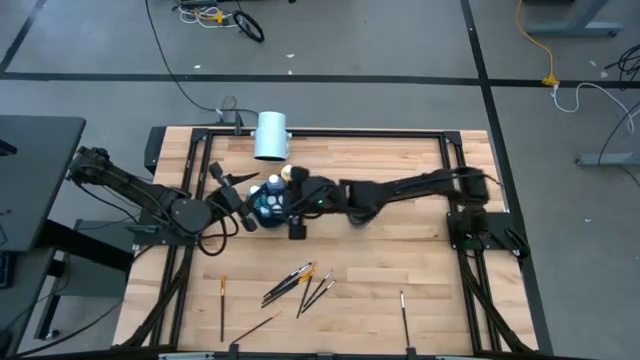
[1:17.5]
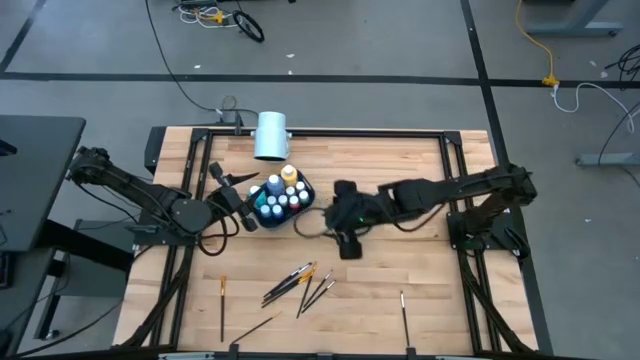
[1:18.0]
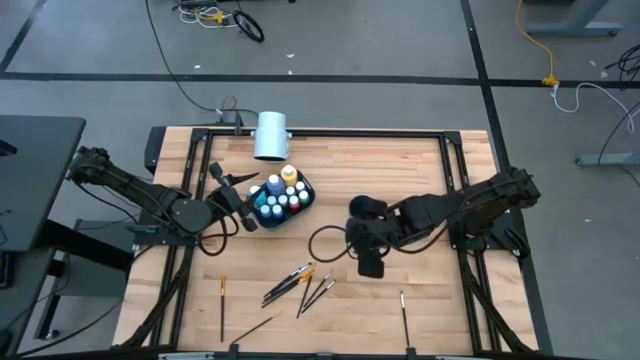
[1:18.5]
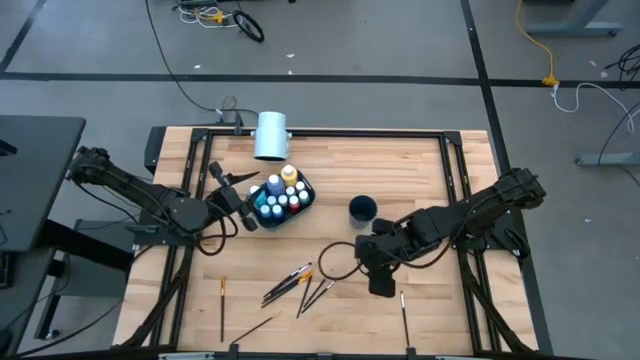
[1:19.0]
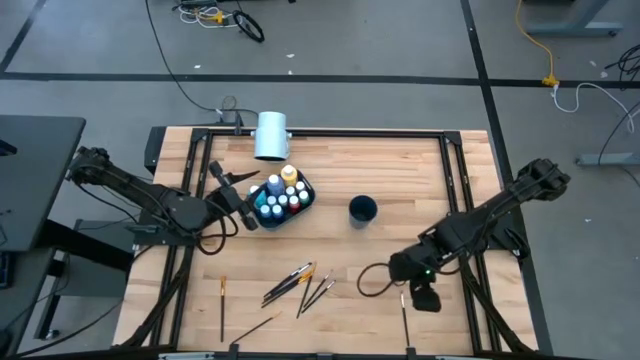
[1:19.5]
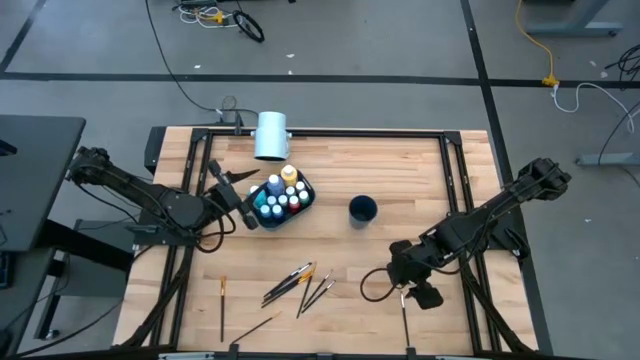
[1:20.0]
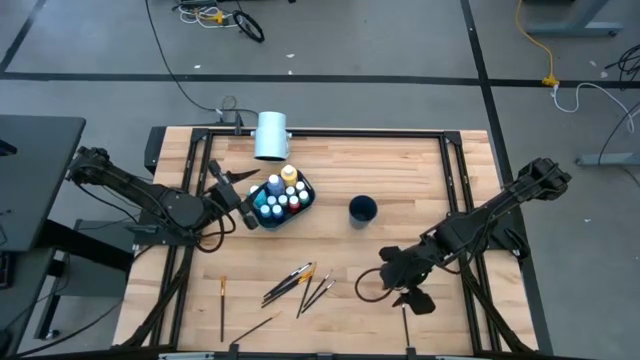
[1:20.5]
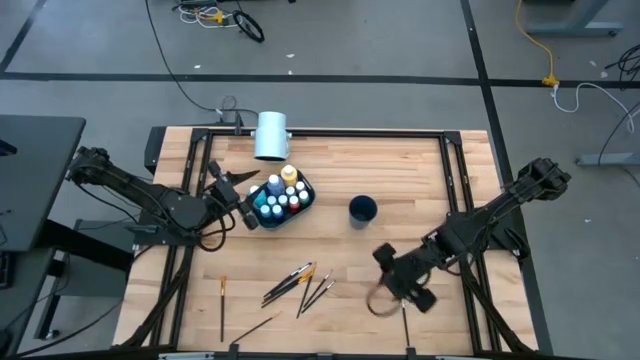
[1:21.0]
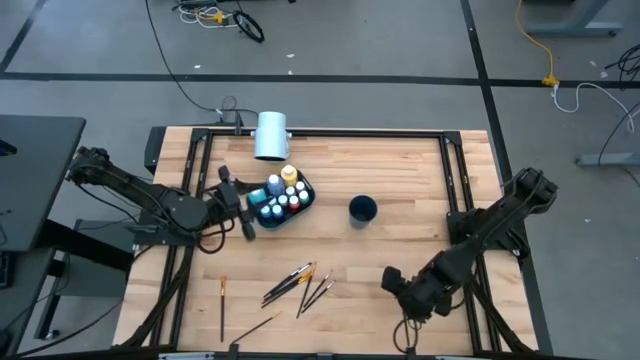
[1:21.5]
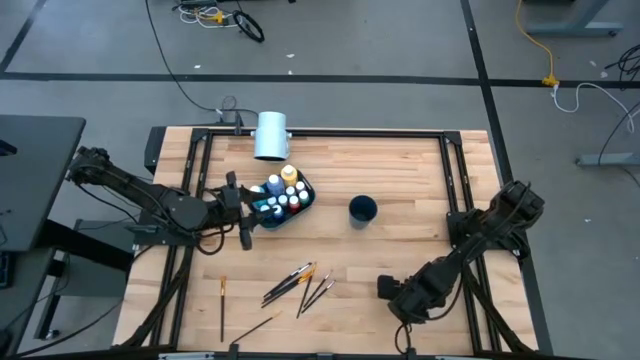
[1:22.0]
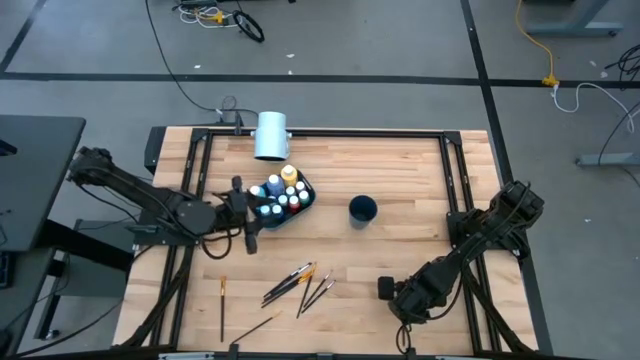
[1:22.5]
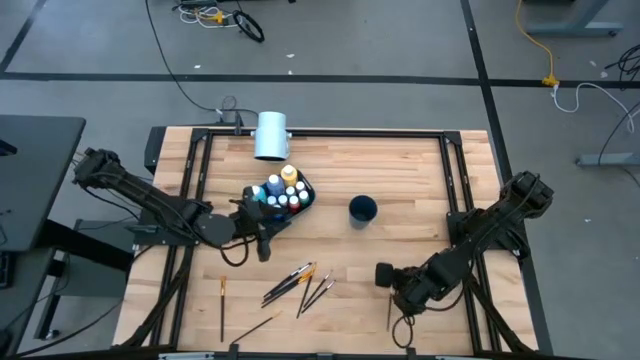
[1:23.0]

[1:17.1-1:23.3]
Task: Pick & Place Paint Supplies
Put the silver paint brush into the blue cup

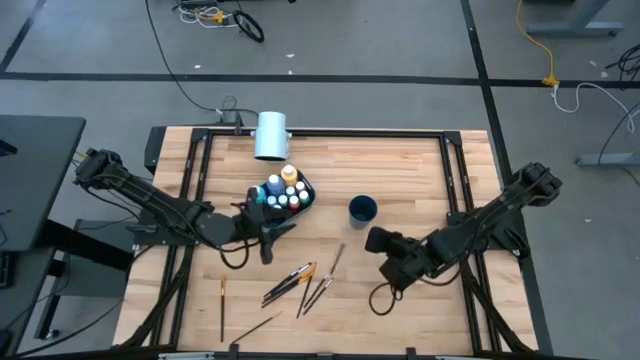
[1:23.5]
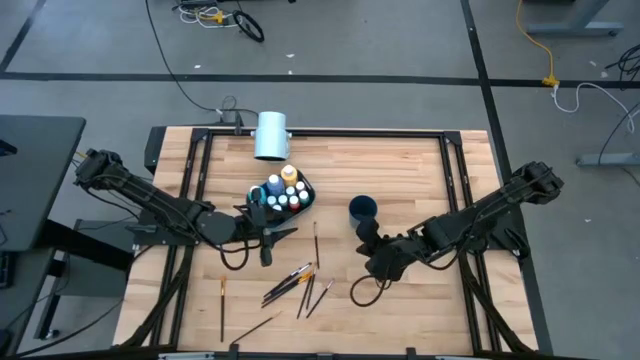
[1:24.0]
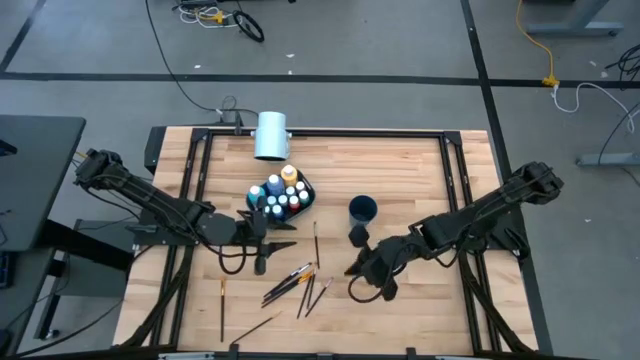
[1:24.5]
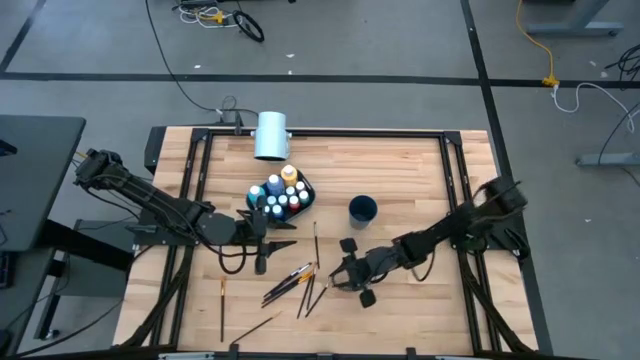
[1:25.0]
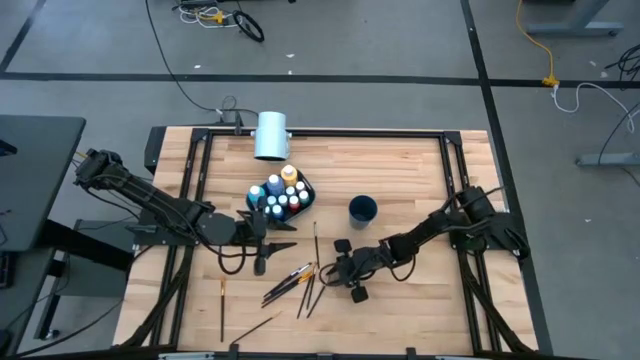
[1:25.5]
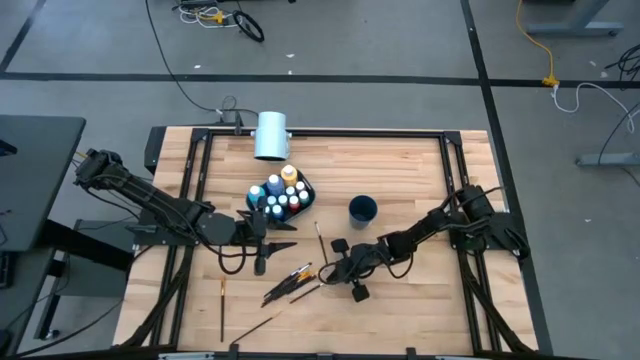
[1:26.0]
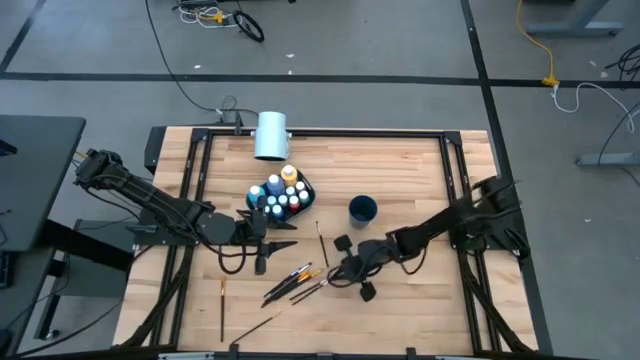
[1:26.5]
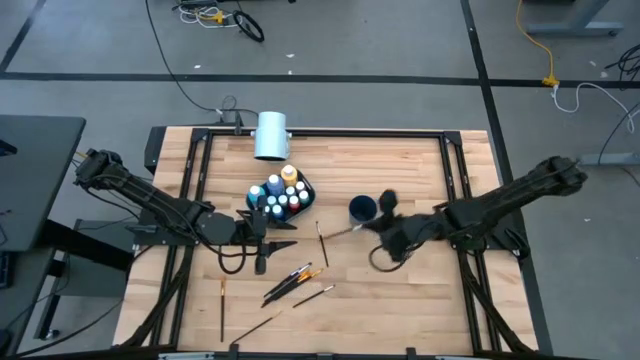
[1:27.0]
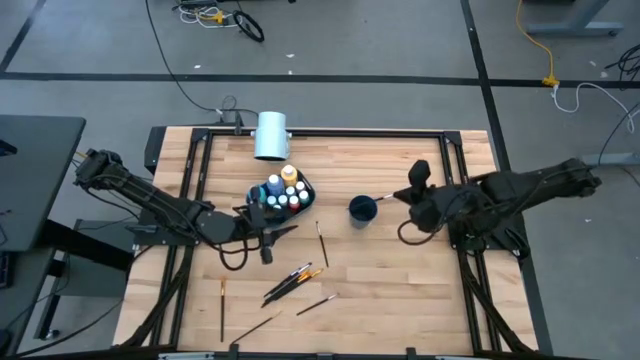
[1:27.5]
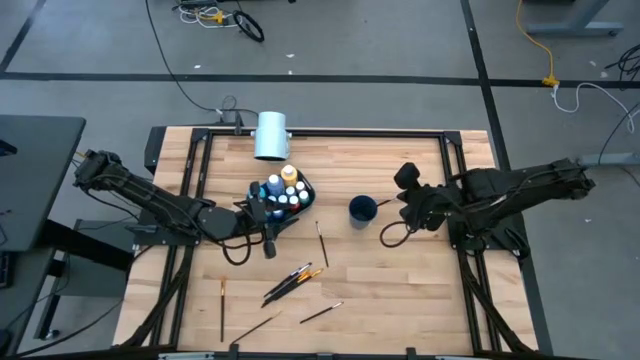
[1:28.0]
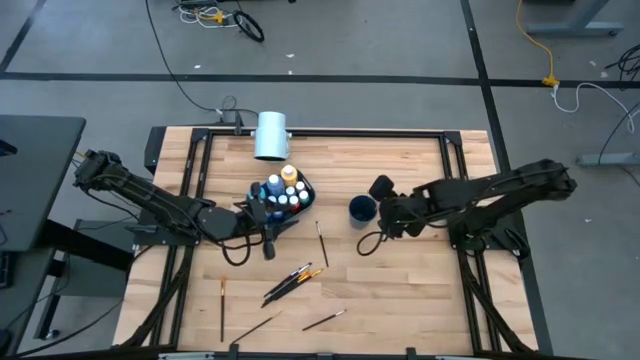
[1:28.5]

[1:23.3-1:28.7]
Put the silver paint brush into the blue cup

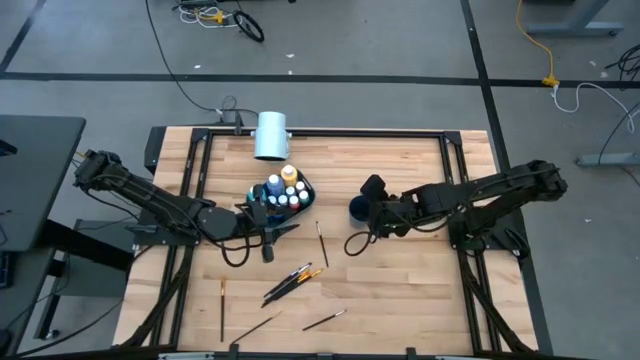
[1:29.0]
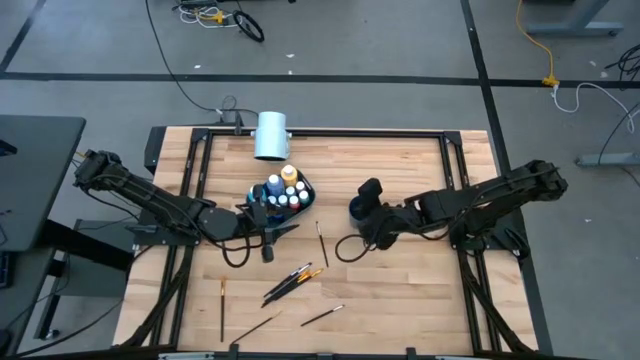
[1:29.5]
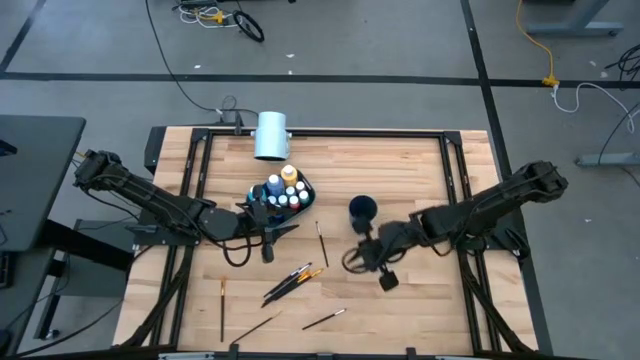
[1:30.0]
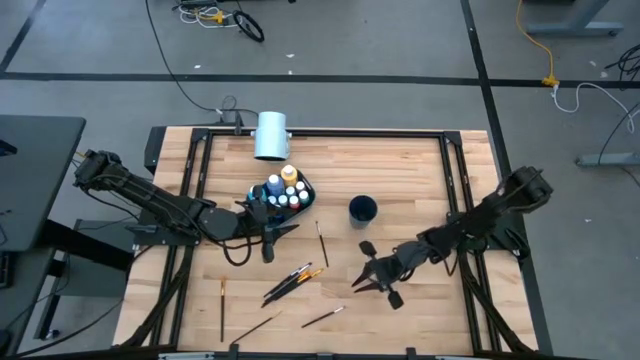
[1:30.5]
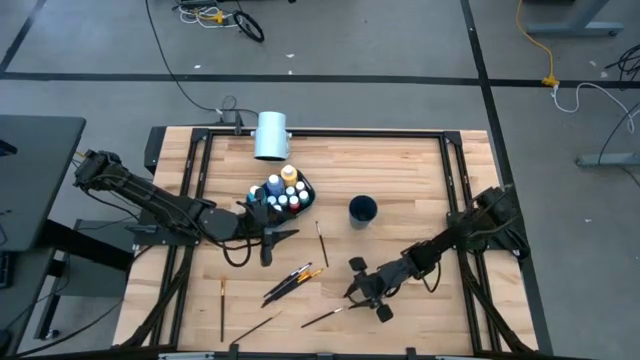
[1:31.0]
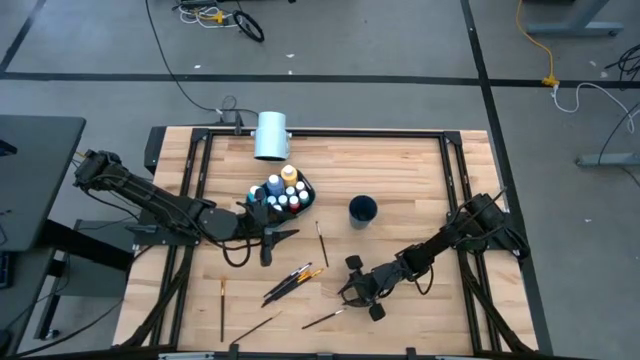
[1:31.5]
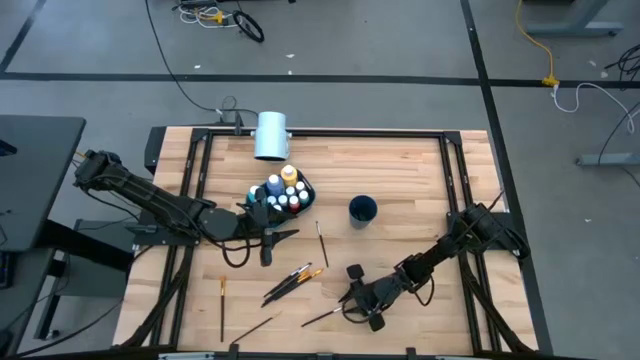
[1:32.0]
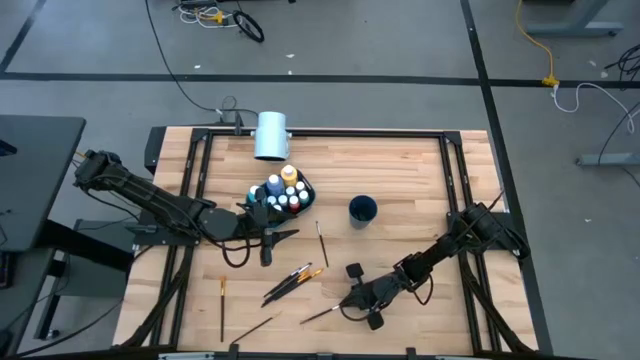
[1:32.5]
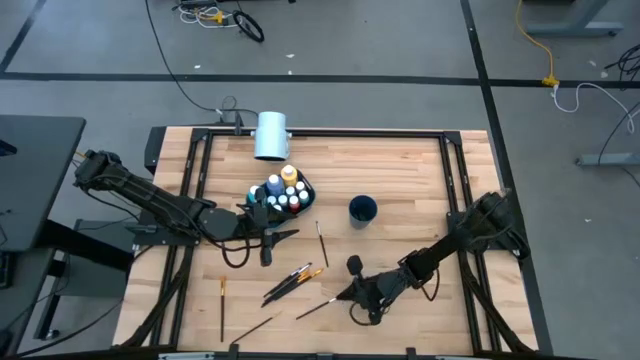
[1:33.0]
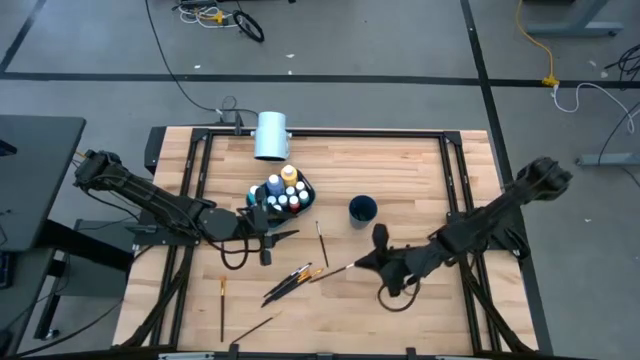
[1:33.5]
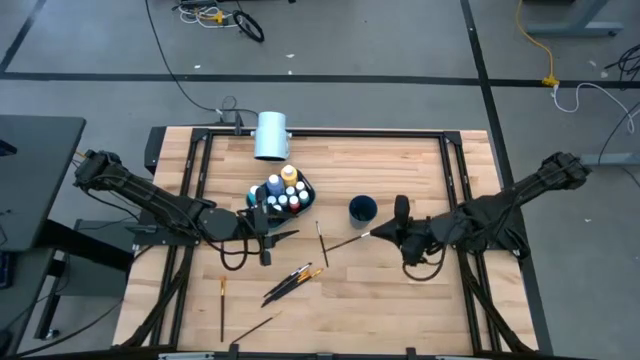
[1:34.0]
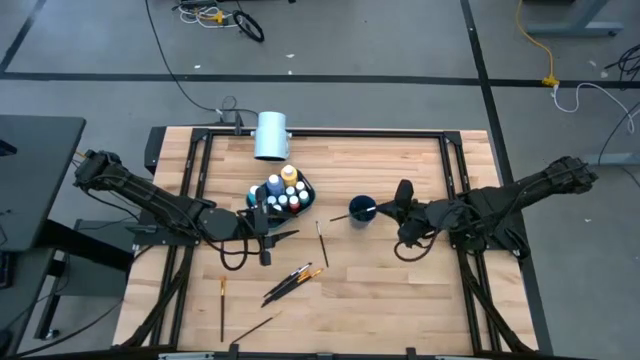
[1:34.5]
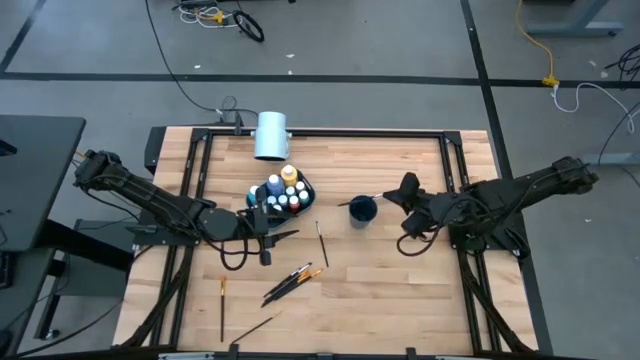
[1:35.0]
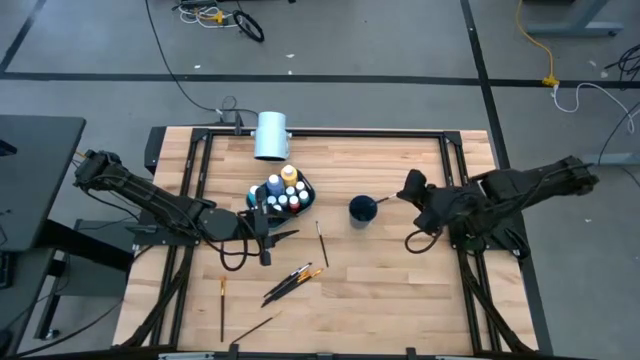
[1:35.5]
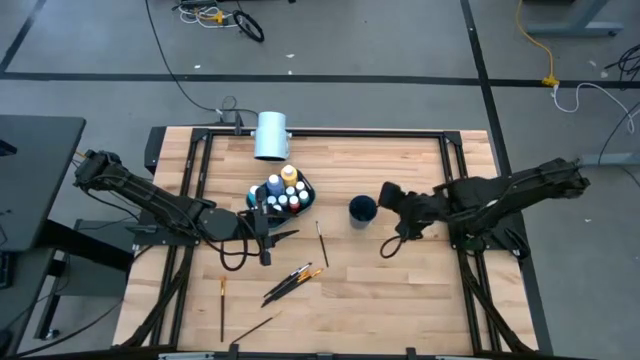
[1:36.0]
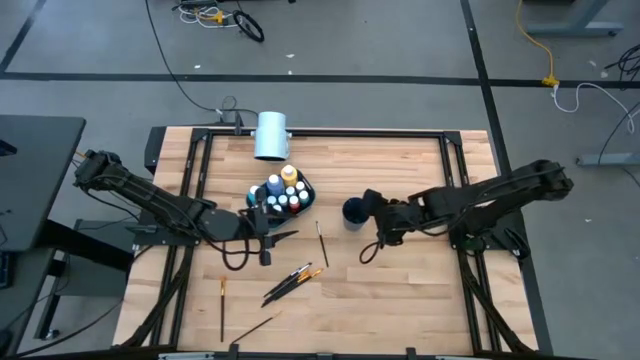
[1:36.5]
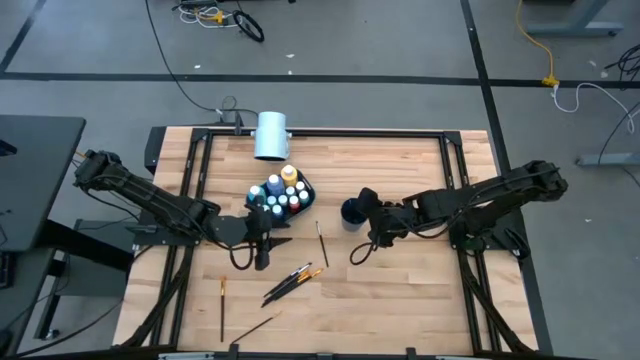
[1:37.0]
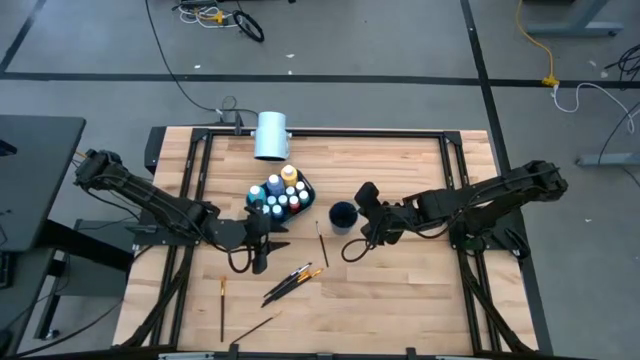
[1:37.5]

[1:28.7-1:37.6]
Put the silver pain brush on the bottom center into the cup

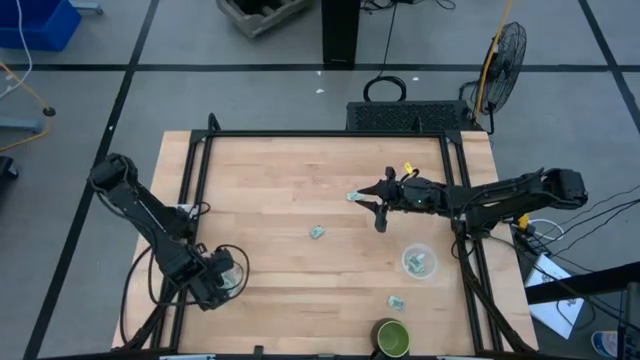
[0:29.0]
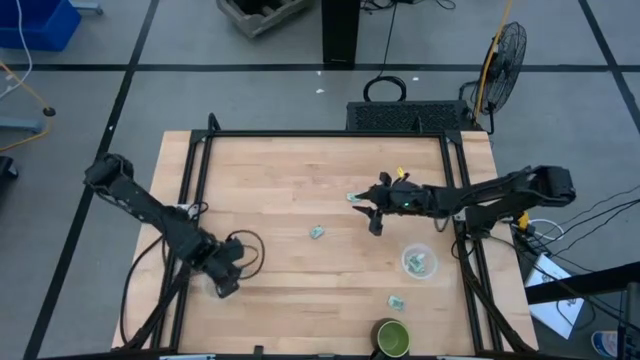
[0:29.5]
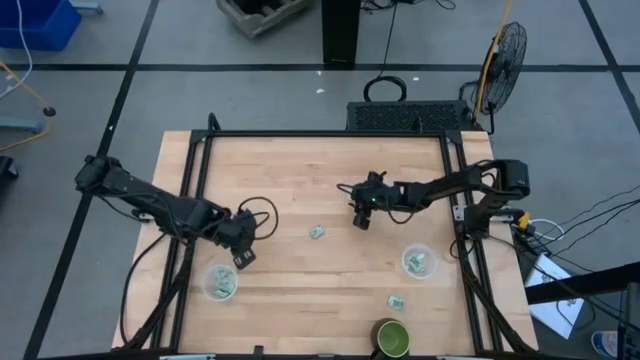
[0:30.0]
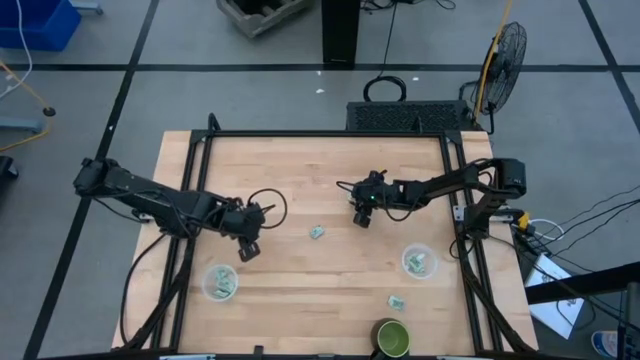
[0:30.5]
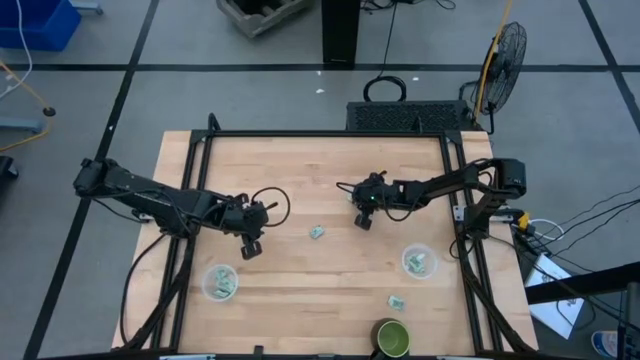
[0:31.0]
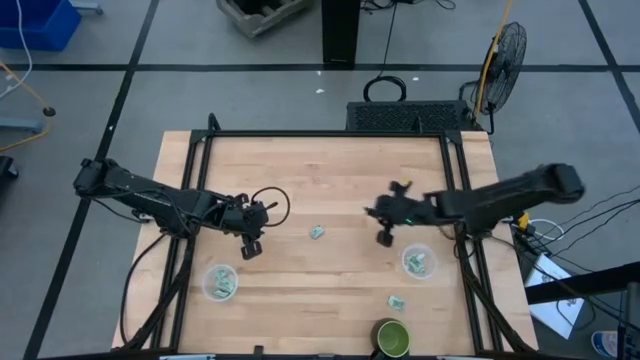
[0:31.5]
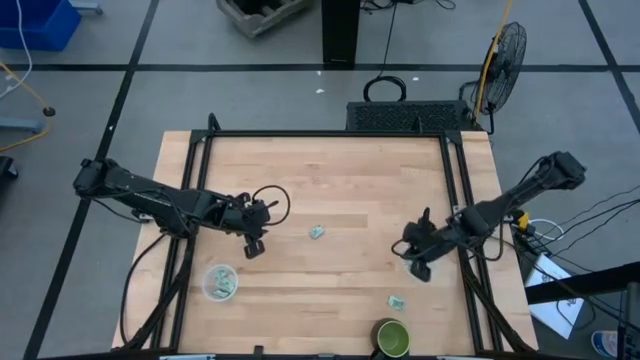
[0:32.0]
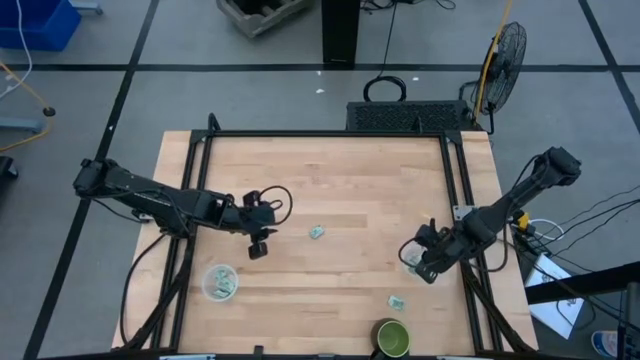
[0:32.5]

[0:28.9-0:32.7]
Task: Pick and place Stevia / Truvia into bins
Put the Stevia packet into the right transparent plastic container
